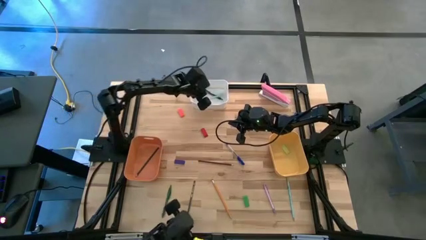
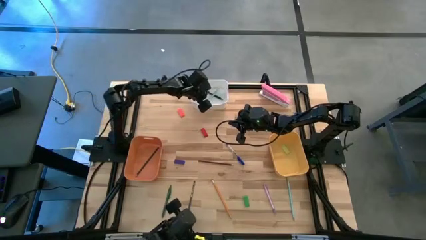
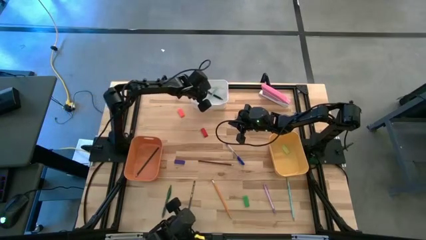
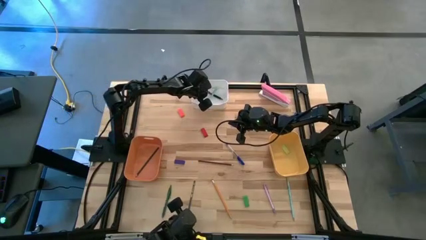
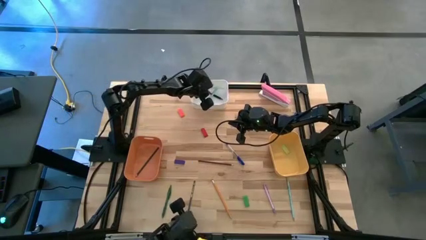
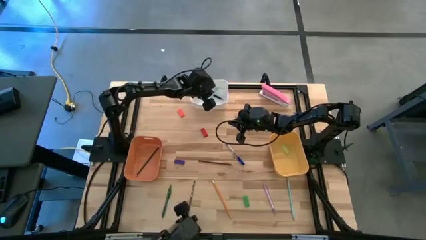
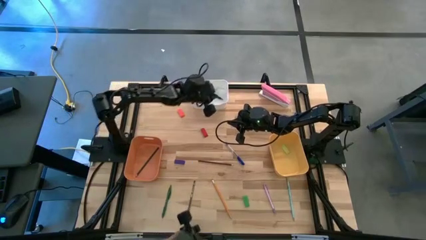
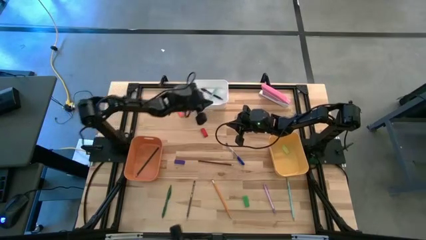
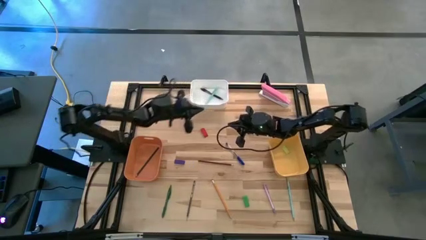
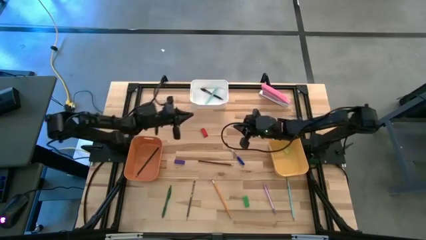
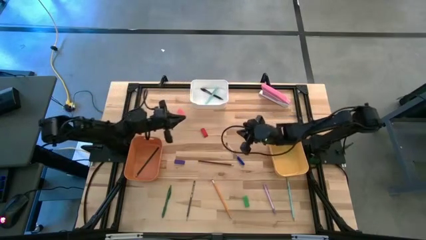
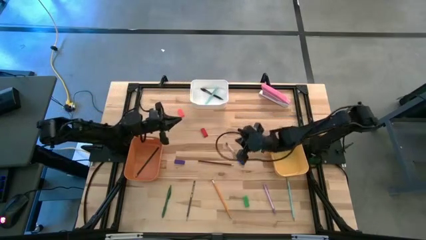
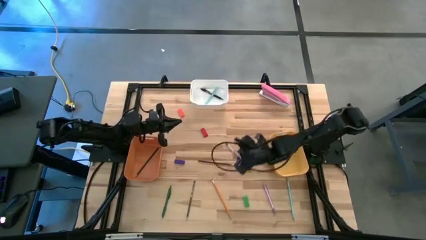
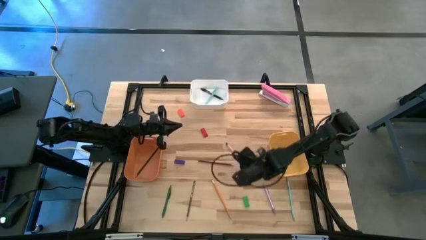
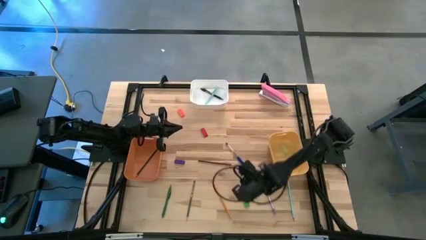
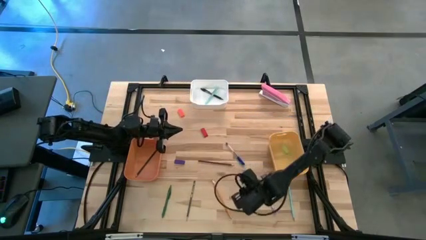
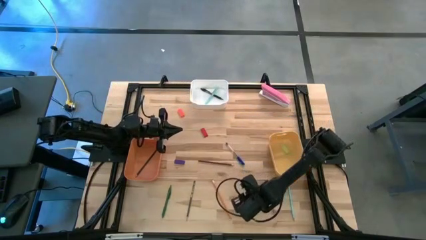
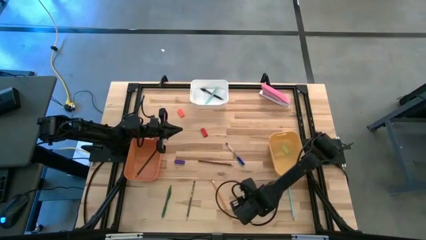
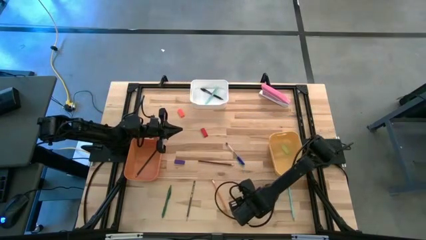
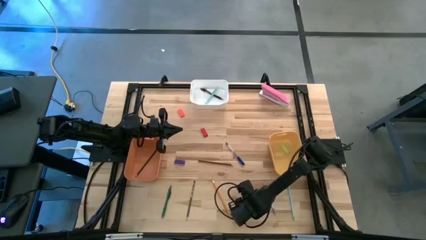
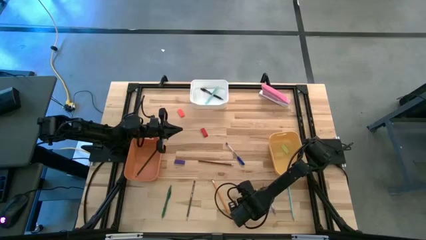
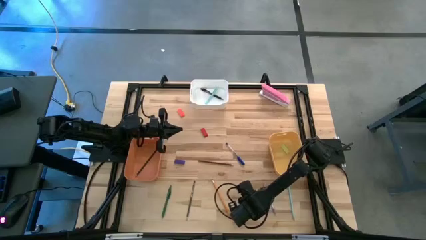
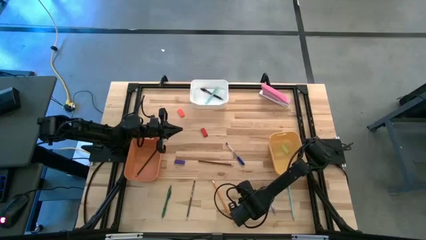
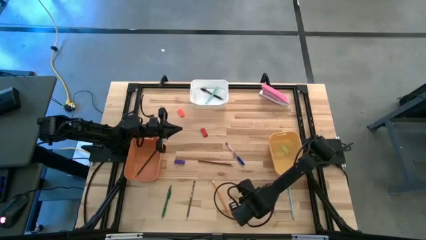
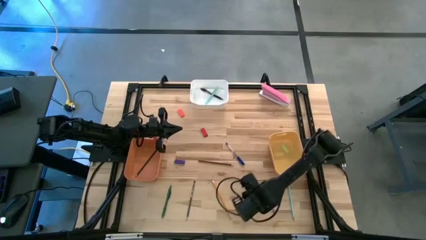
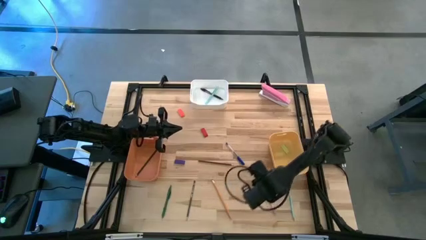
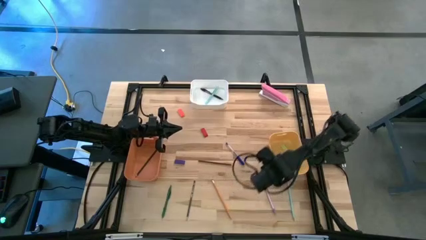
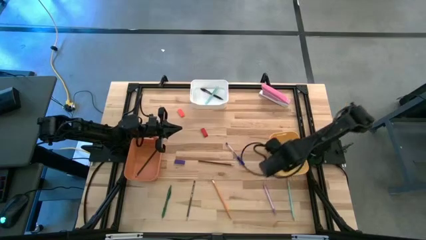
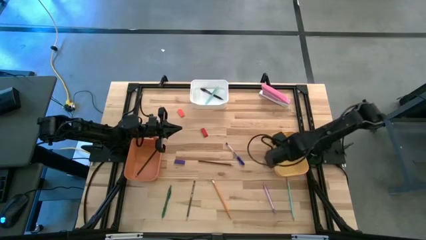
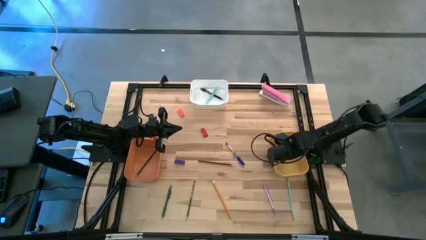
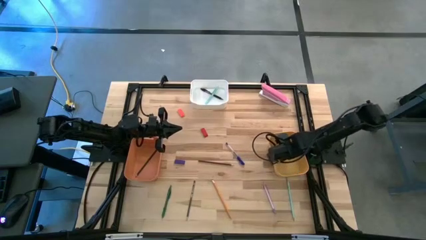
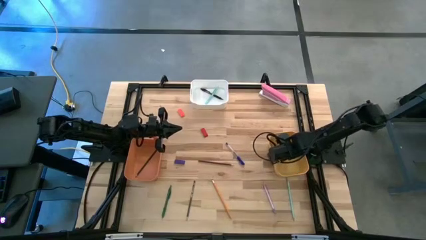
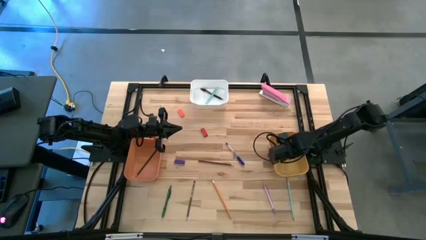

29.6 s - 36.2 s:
Task: Sort crayons/erasers/pens/pencils in bins
Put the green eraser into the pale yellow bin

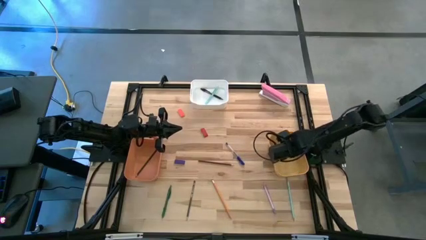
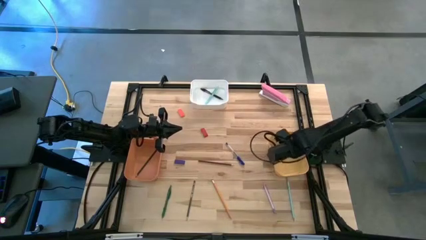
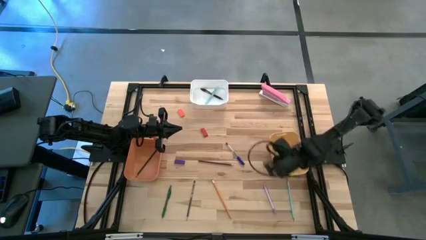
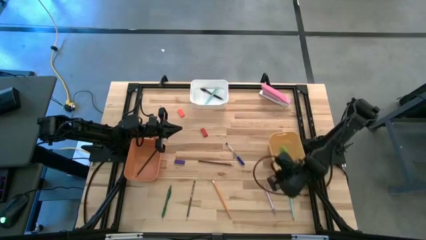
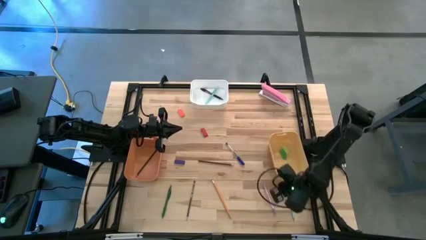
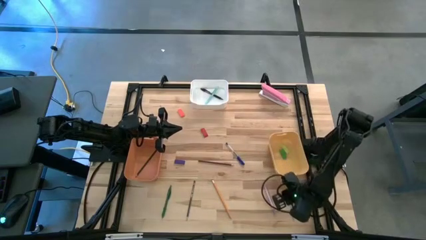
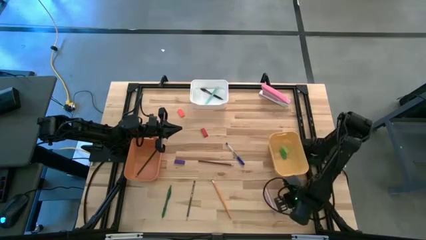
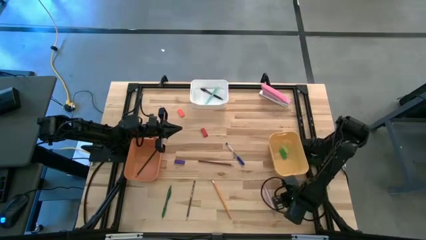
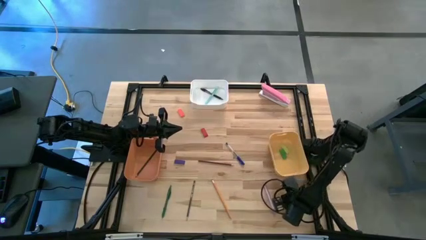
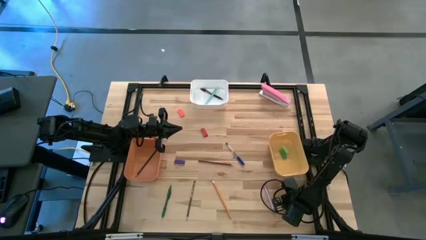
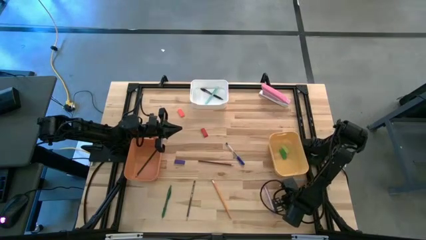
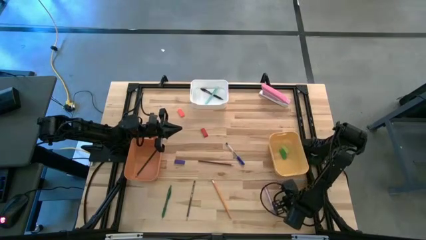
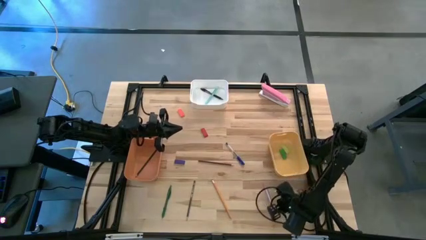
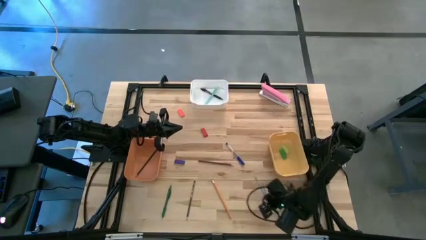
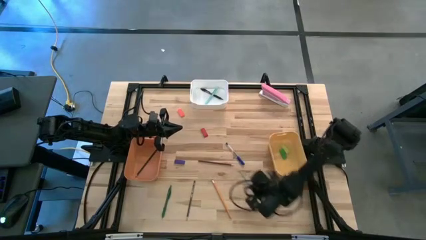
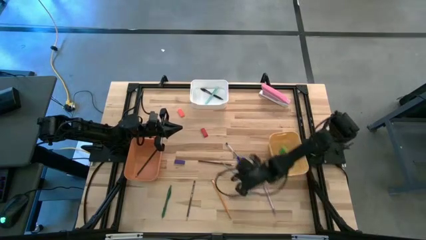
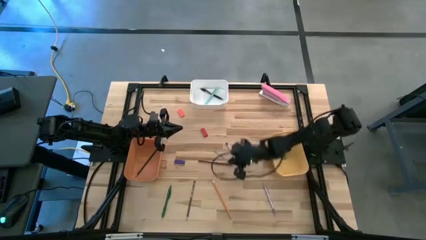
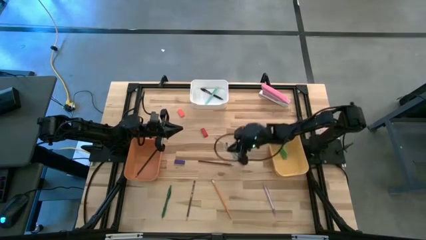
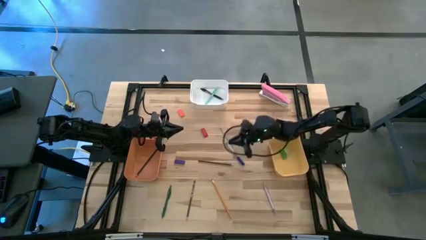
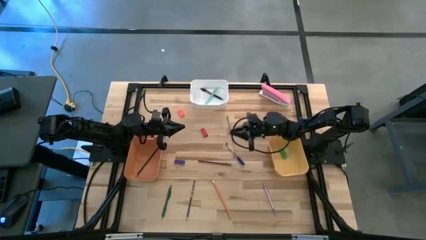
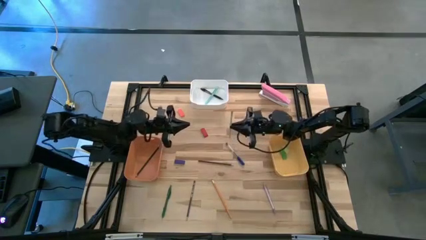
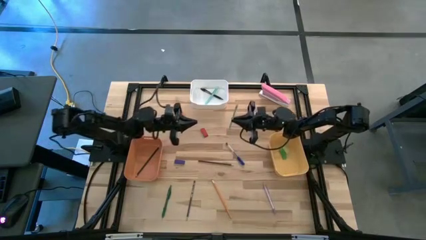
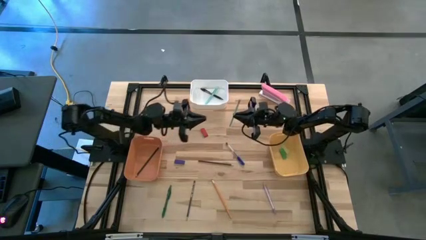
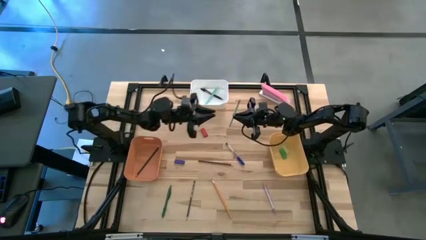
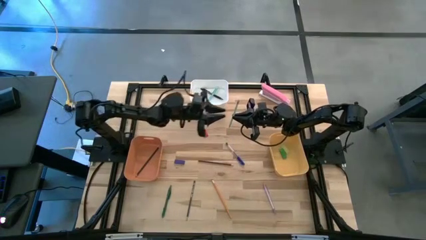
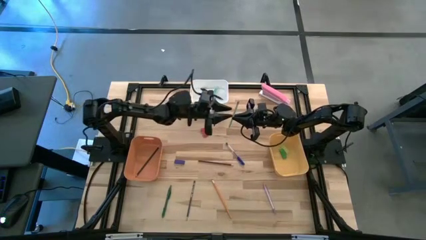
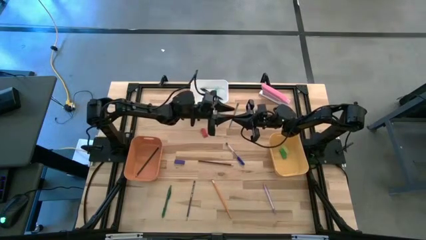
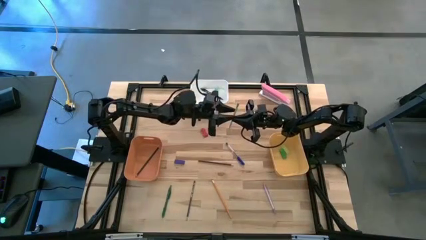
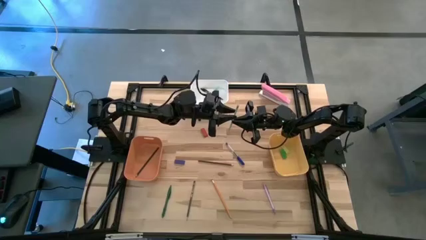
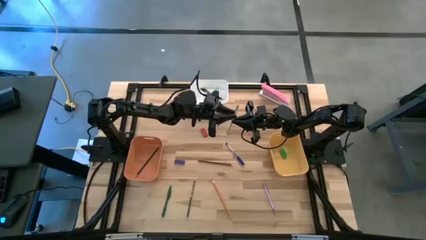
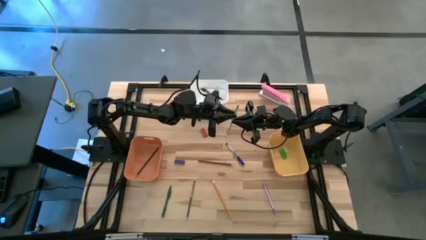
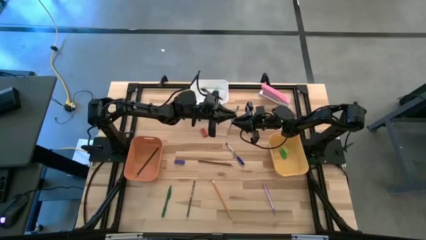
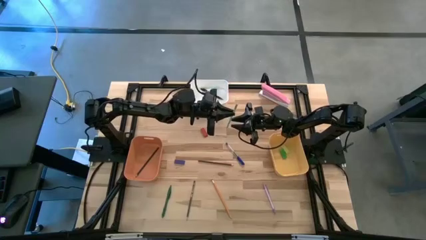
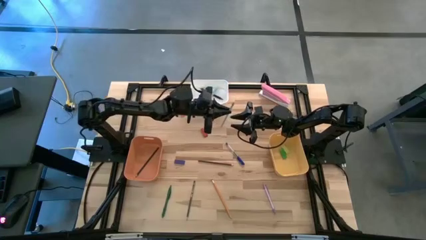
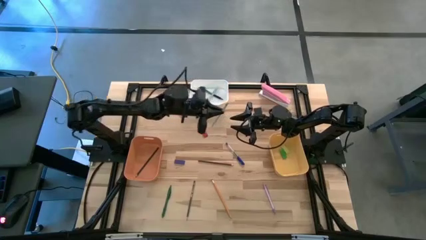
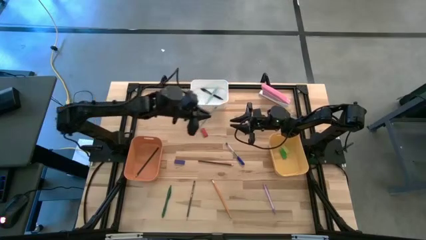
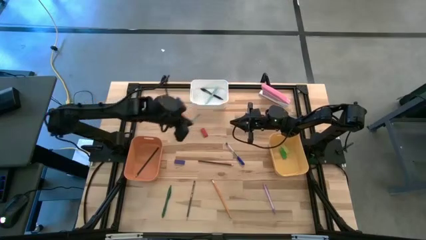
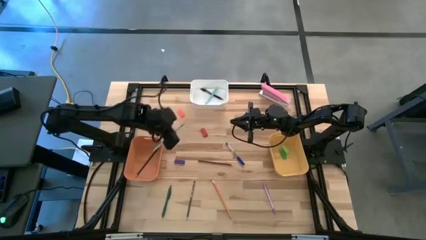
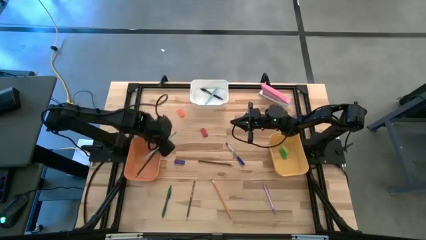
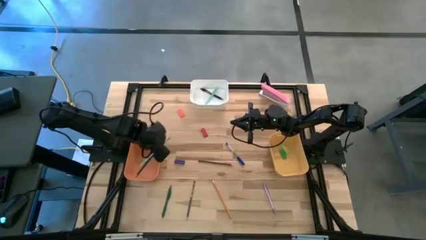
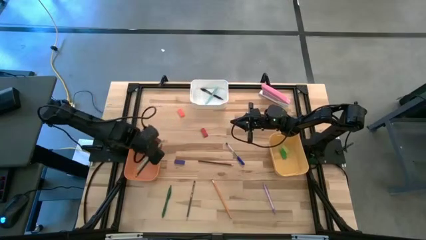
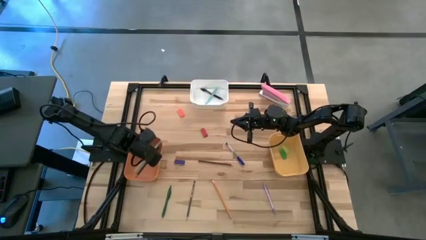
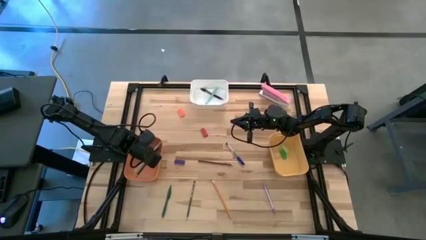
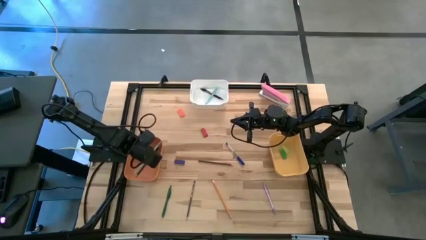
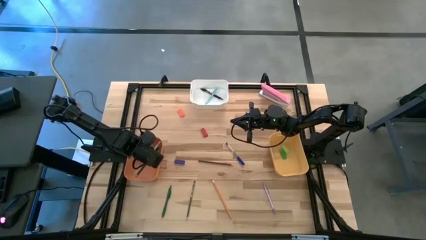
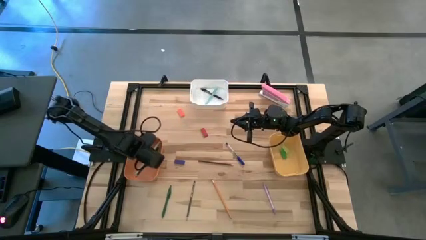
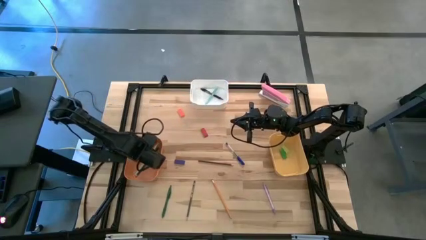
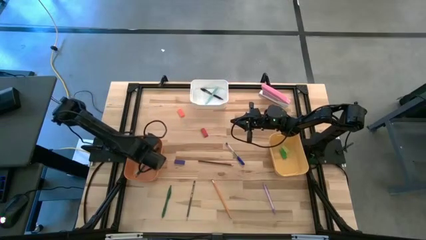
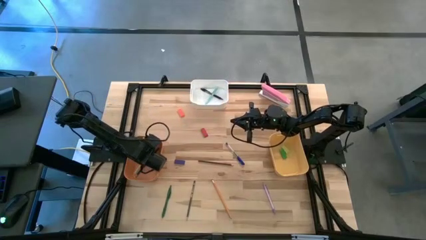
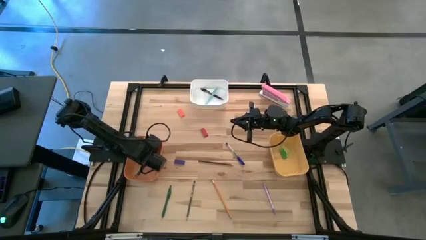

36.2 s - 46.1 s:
Put the light blue pencil into the orange bin
